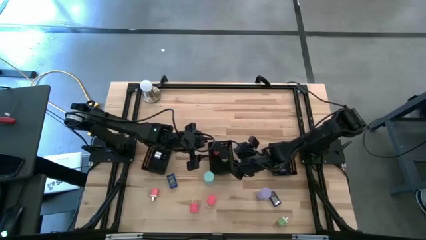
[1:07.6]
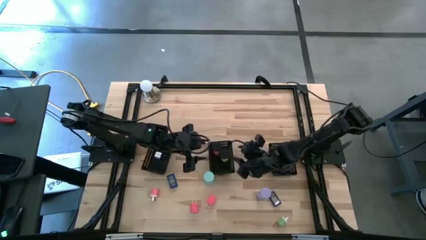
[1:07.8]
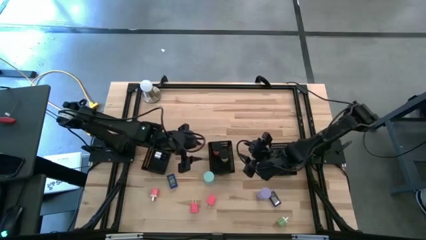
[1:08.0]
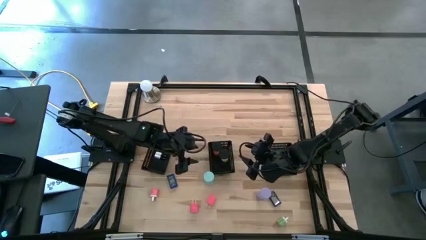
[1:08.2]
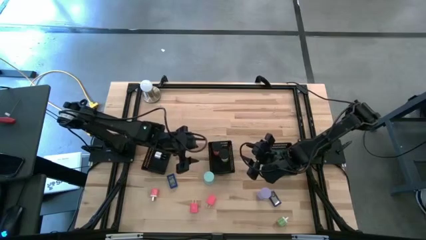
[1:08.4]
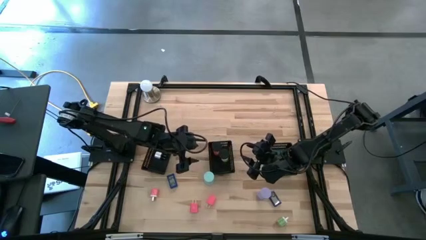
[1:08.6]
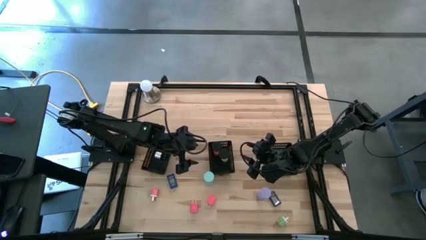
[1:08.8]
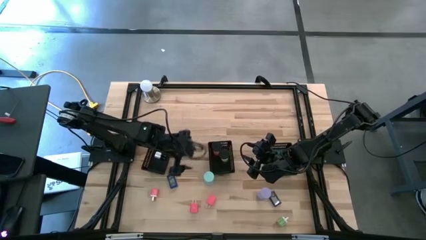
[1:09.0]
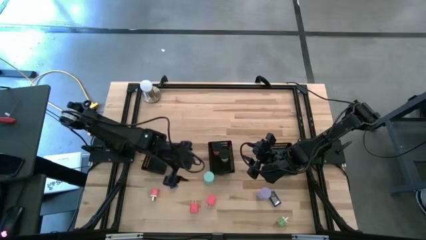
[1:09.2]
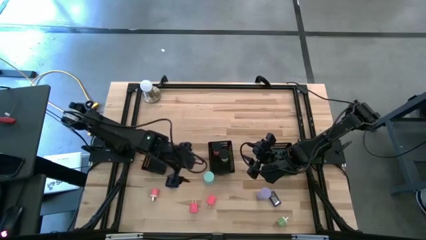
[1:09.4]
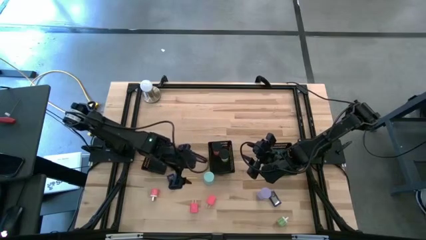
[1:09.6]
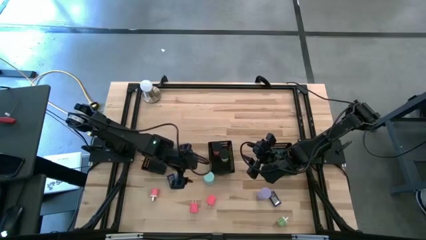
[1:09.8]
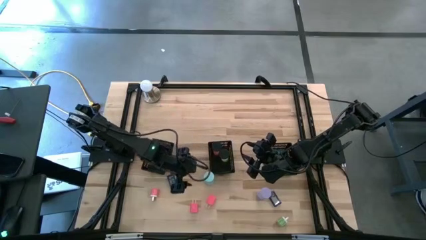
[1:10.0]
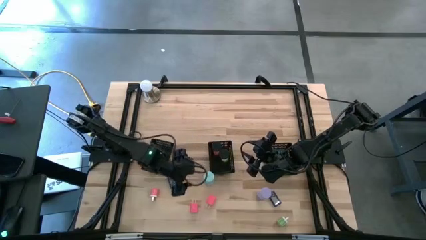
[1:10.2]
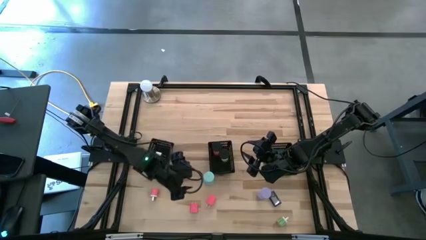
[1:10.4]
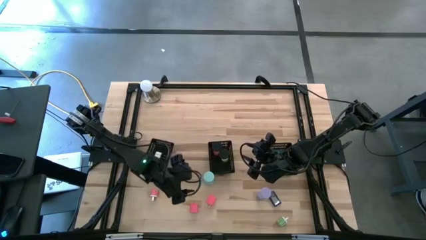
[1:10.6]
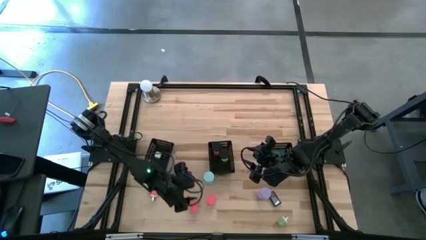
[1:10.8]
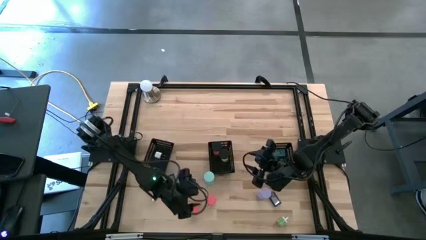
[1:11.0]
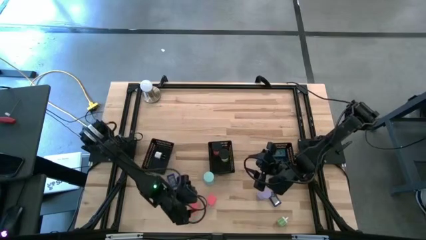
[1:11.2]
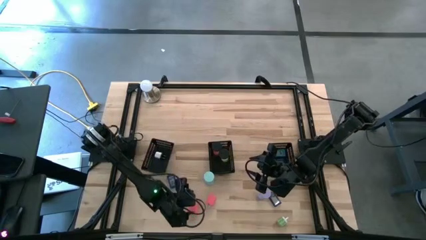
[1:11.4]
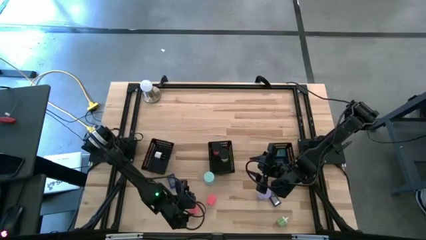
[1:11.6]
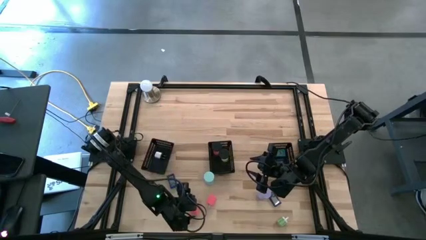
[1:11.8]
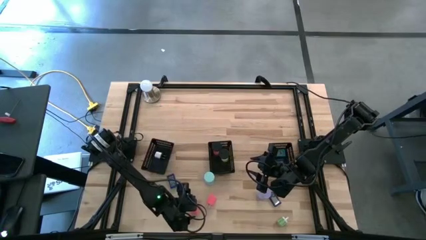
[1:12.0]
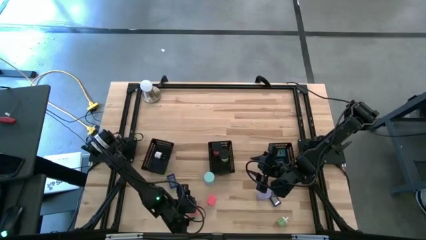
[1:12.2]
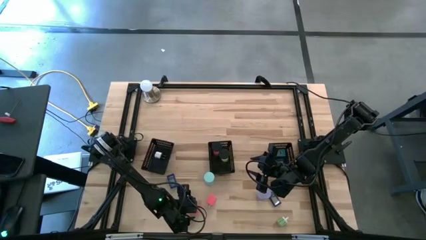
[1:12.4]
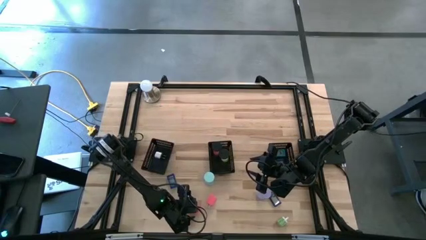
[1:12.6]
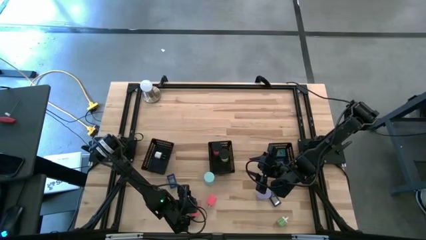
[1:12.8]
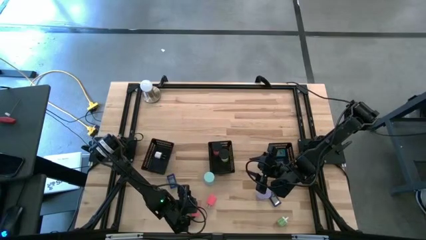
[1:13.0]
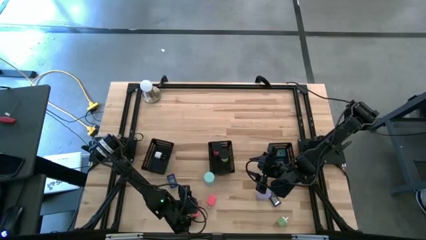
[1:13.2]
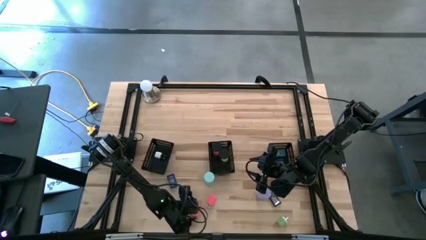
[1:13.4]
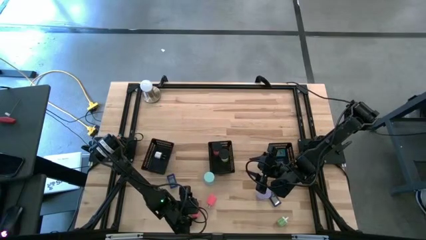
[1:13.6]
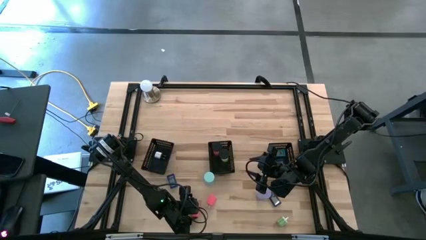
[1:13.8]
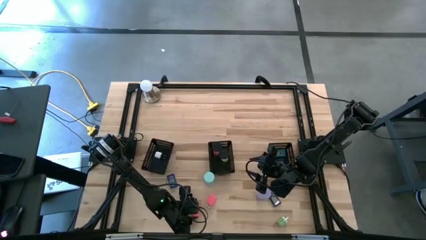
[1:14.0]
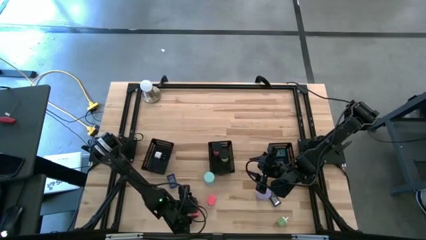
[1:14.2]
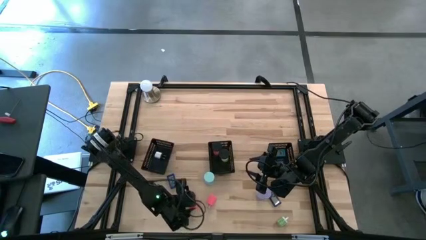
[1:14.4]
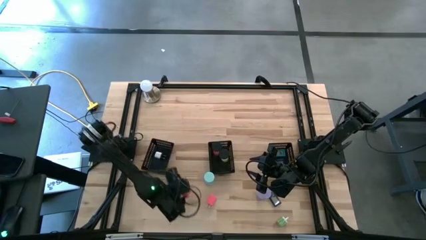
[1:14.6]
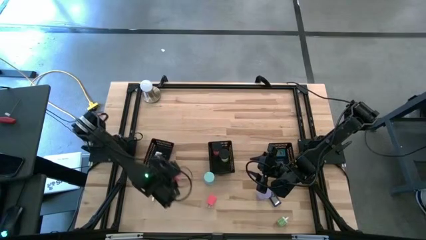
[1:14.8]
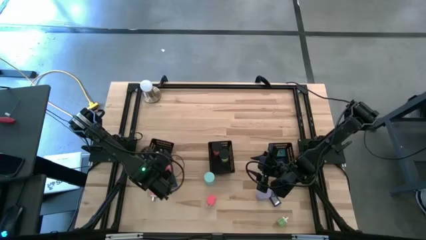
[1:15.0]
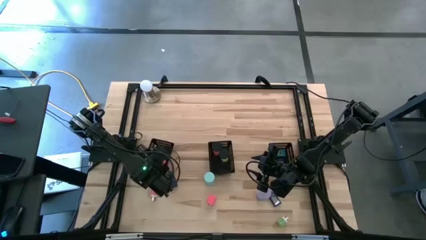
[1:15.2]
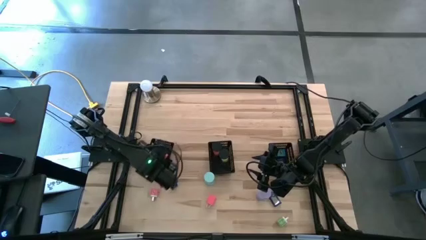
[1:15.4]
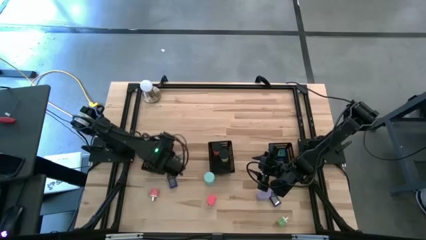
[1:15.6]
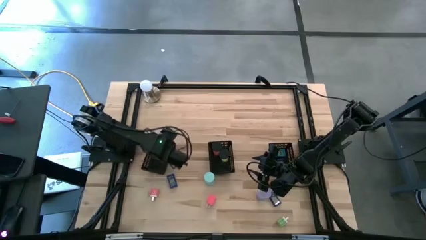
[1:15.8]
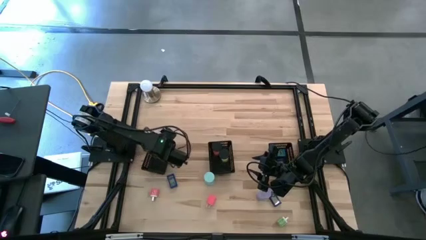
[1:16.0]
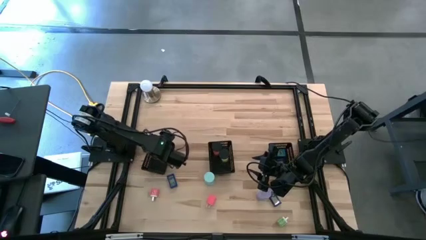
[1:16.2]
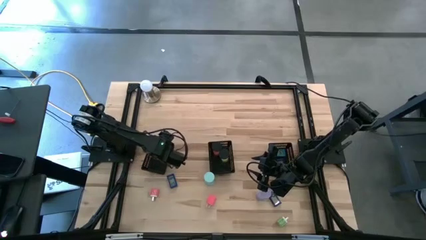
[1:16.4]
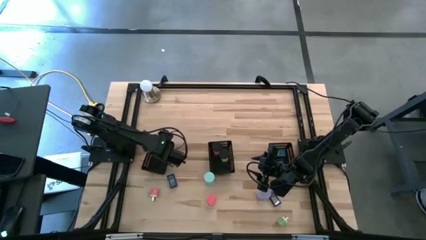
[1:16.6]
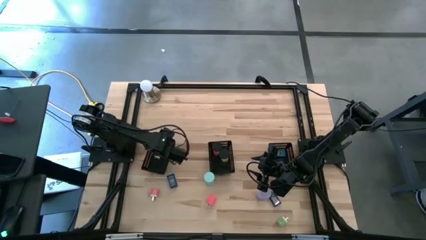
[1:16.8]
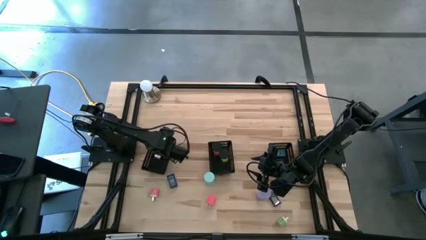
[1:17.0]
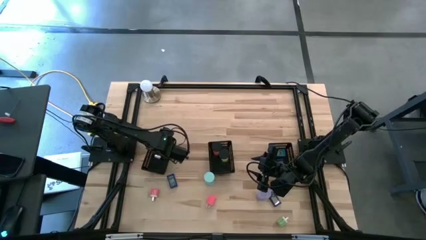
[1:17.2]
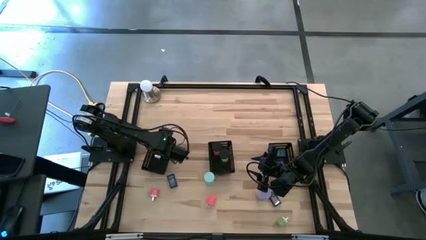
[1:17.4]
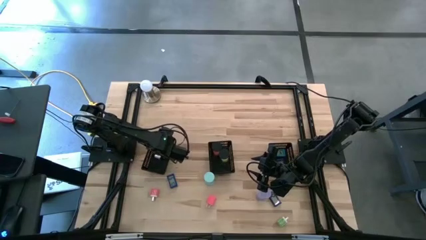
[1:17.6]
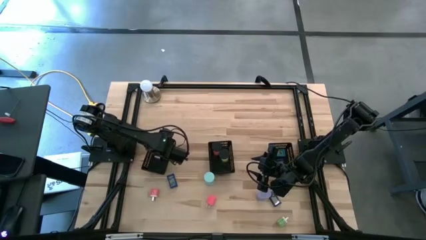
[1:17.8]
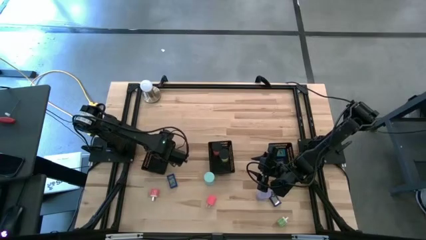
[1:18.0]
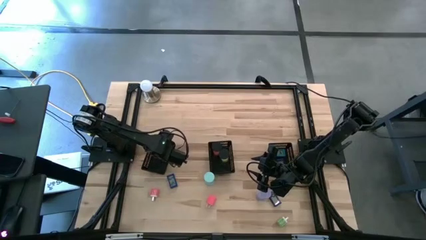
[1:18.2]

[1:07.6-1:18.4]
Task: Pick & Place Office items
Put the left pink charger adapter into the left black bin

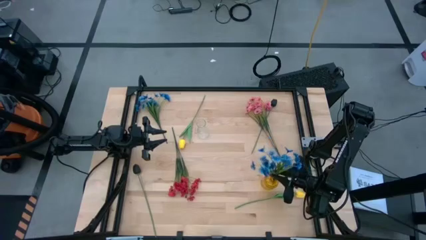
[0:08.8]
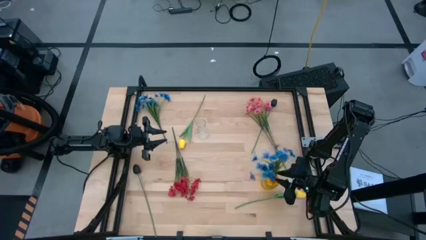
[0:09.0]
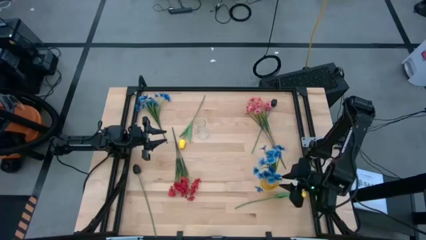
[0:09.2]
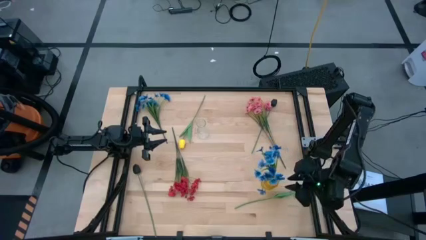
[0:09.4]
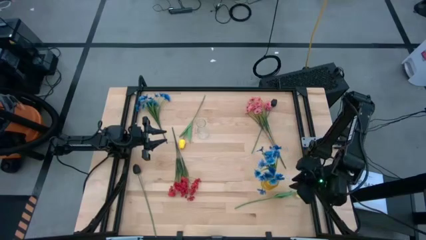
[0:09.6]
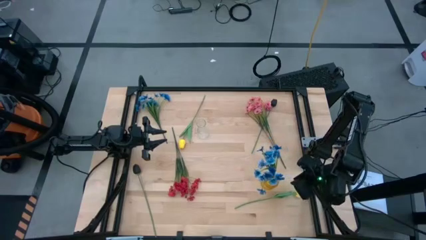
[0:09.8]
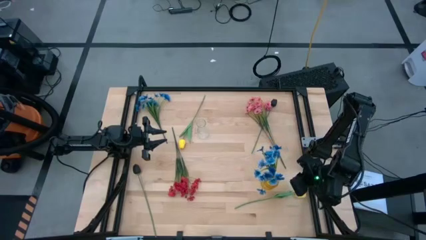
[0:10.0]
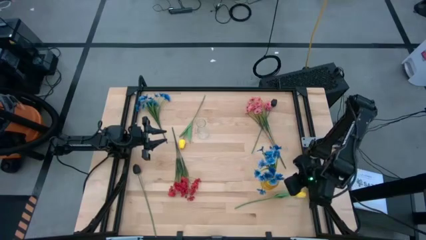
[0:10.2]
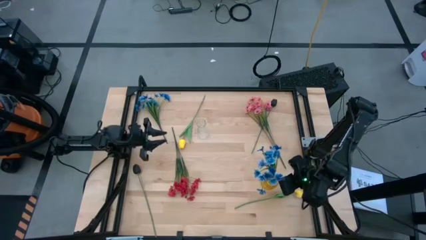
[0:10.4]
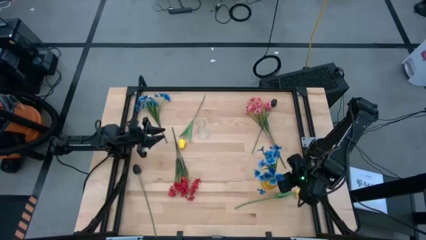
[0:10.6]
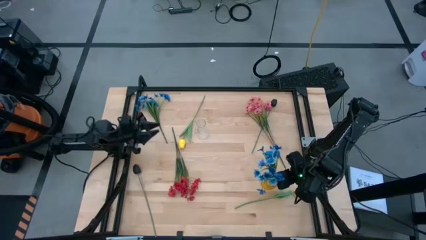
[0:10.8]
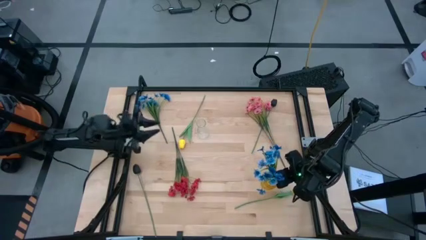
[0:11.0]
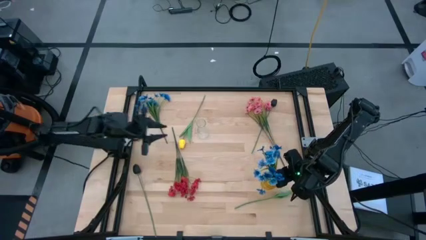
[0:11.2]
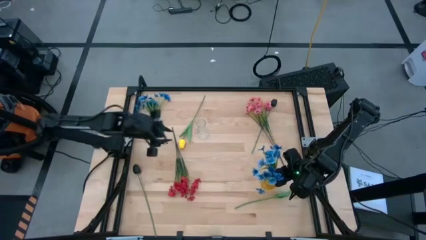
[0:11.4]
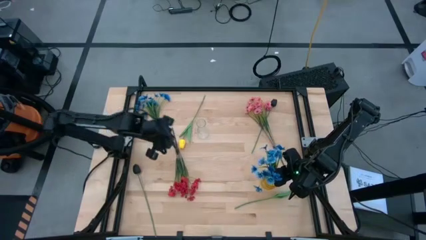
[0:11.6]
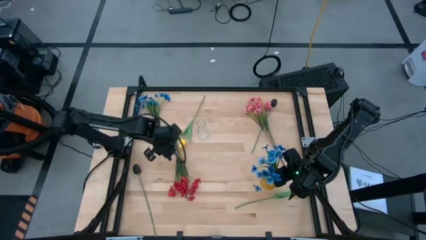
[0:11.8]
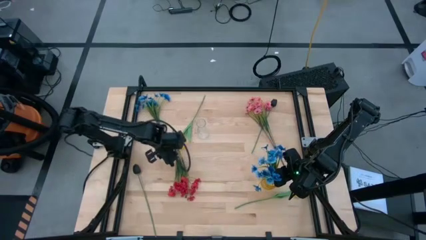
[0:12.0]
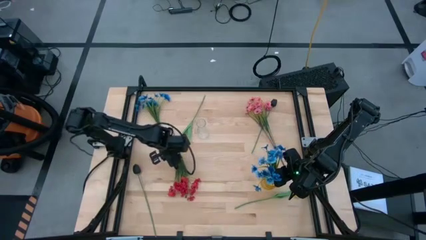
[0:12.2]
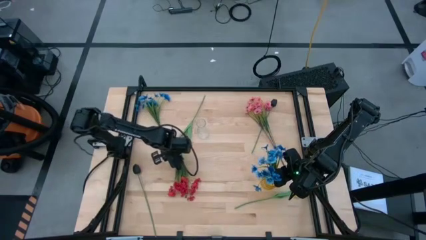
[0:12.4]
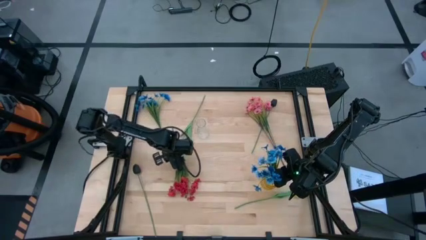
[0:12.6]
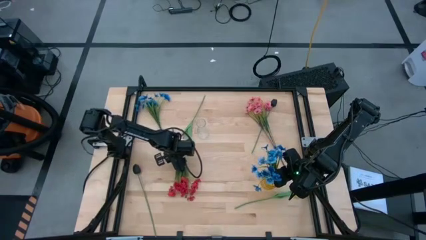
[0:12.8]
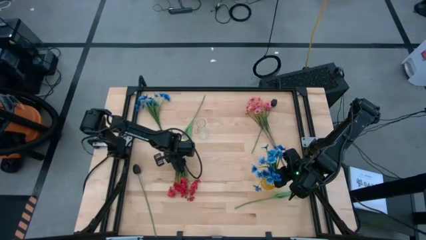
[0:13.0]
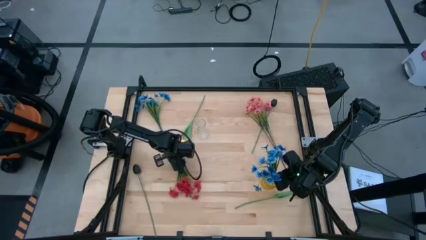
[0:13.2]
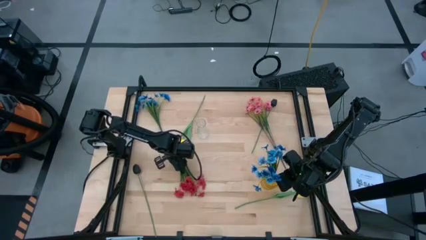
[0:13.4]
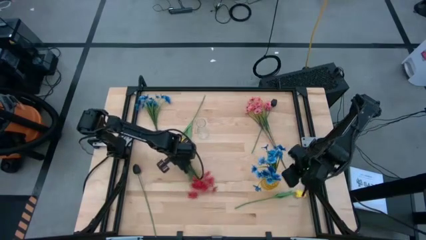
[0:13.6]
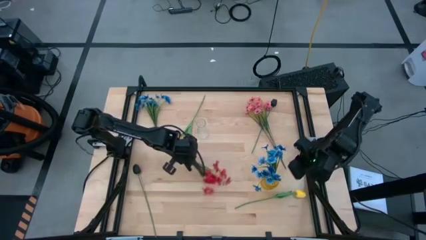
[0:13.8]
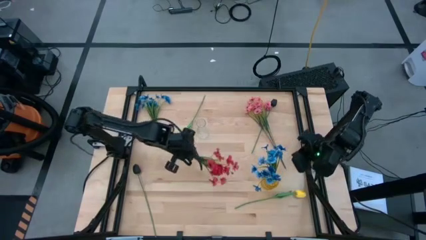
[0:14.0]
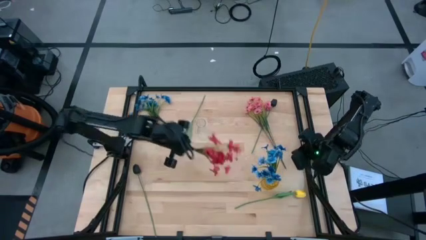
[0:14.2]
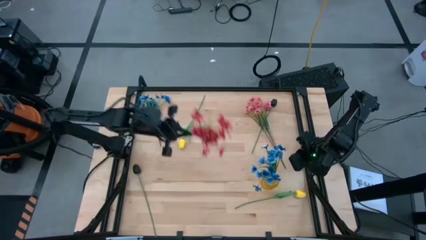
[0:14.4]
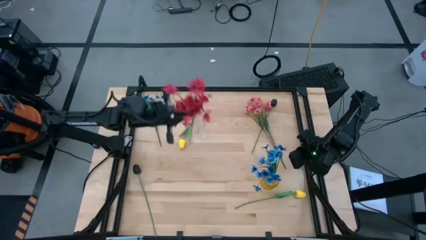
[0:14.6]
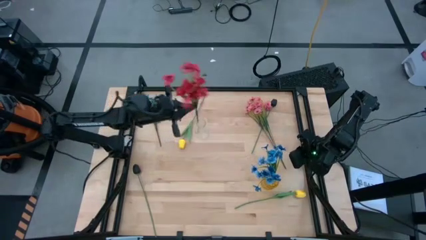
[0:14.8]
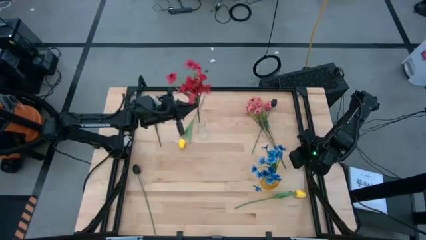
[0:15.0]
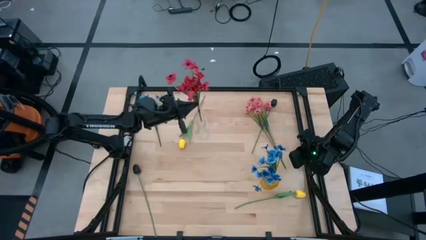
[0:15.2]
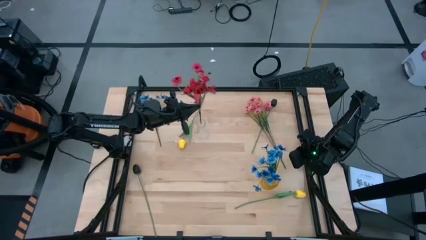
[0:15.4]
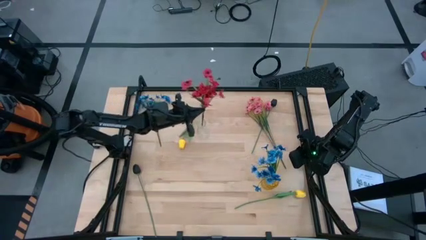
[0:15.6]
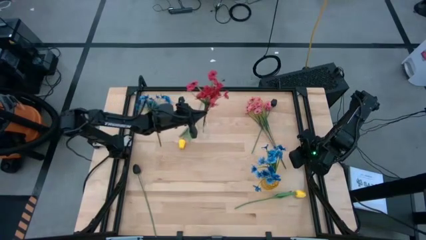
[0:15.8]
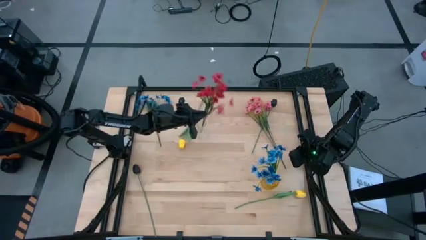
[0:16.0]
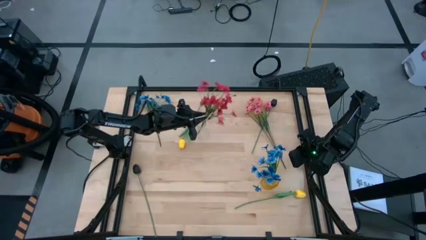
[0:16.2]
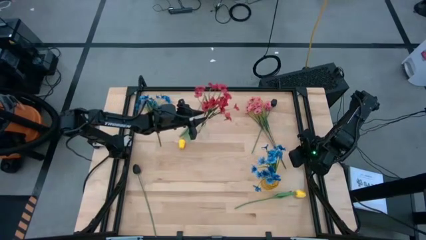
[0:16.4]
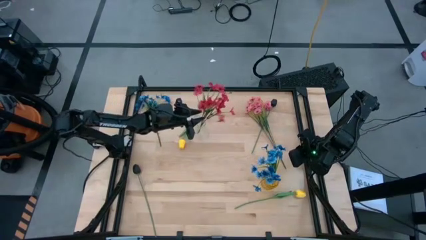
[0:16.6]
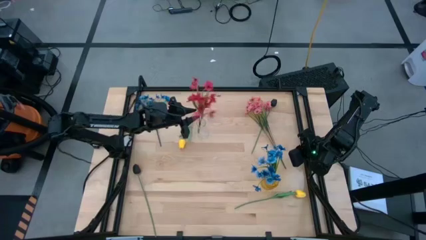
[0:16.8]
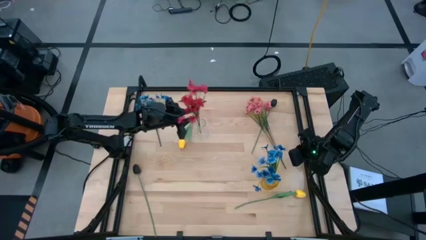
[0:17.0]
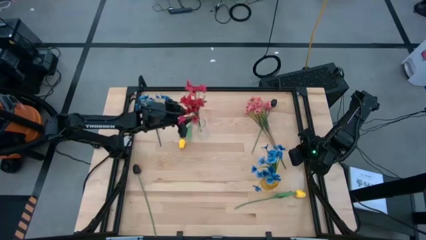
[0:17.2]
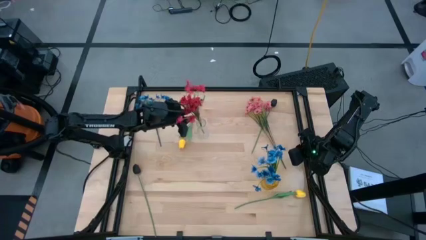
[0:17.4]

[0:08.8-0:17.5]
Task: Sort flowers into vase by color
Put the red flowers into the transparent vase
